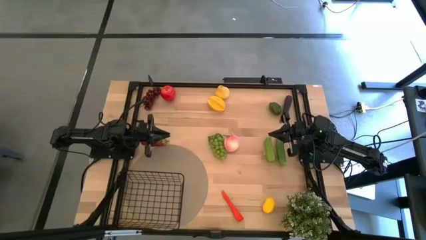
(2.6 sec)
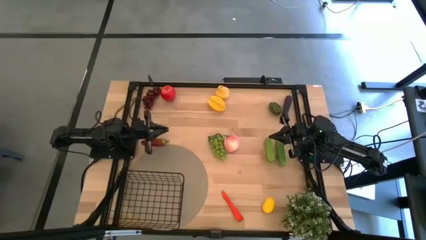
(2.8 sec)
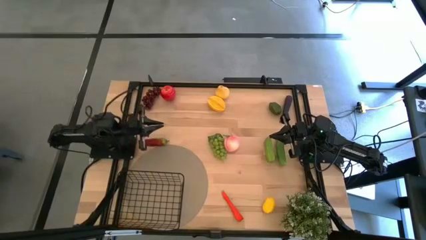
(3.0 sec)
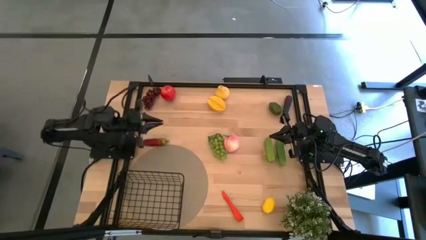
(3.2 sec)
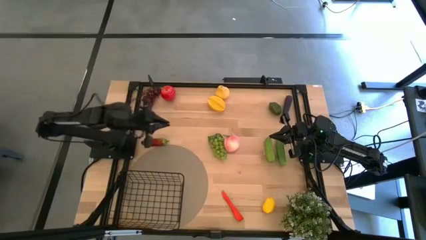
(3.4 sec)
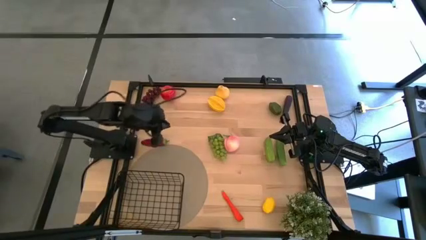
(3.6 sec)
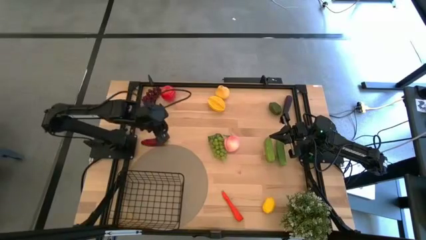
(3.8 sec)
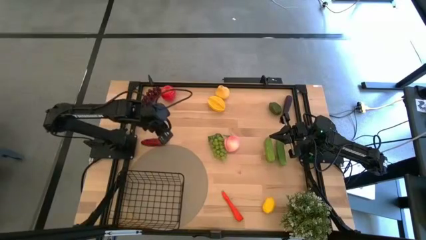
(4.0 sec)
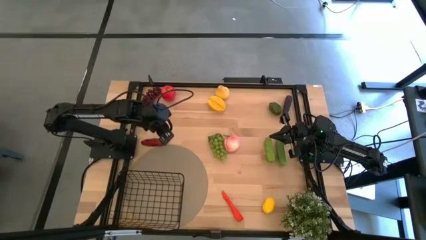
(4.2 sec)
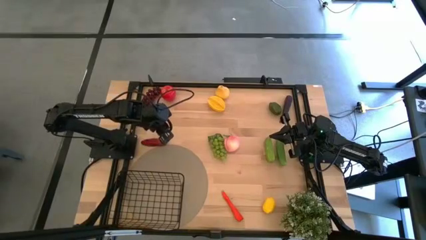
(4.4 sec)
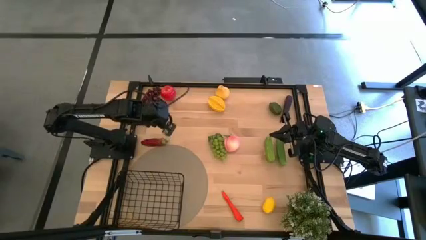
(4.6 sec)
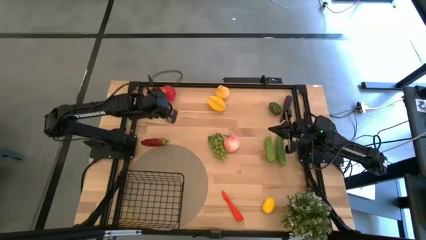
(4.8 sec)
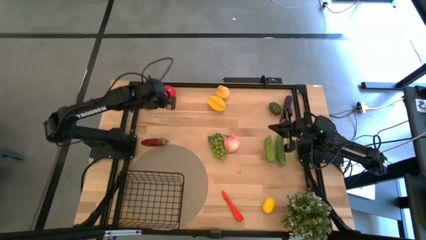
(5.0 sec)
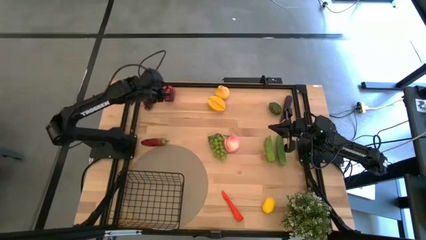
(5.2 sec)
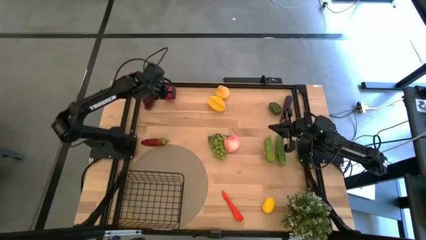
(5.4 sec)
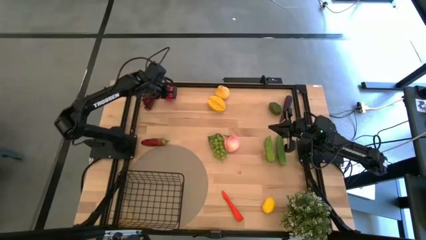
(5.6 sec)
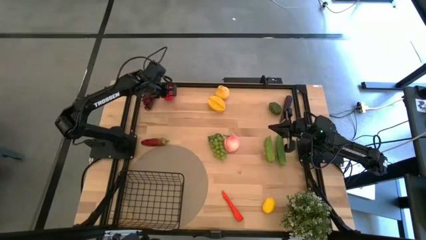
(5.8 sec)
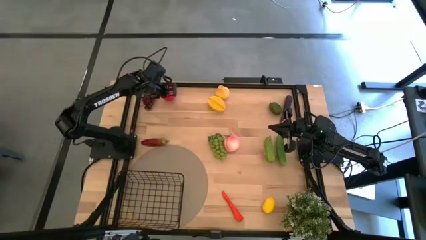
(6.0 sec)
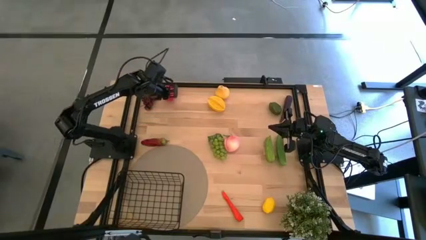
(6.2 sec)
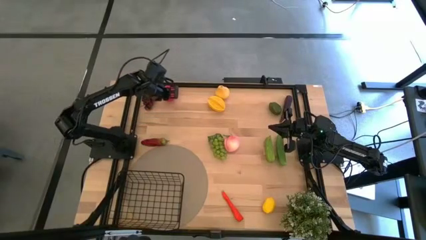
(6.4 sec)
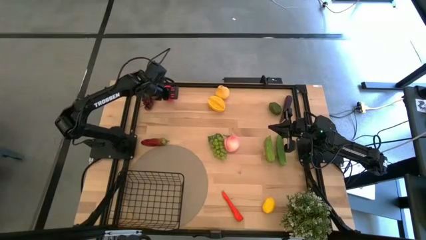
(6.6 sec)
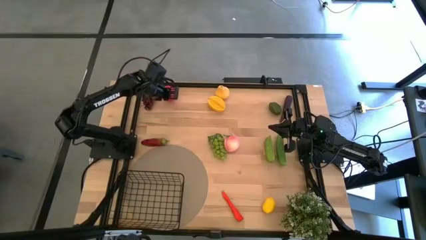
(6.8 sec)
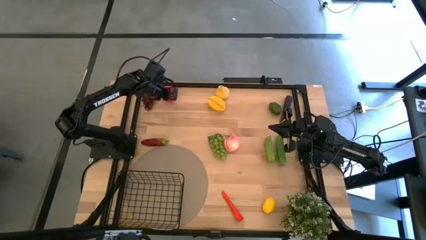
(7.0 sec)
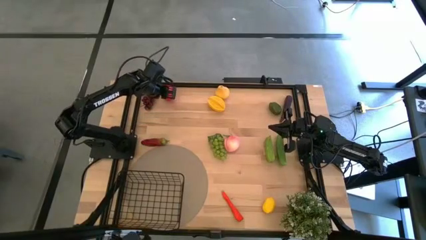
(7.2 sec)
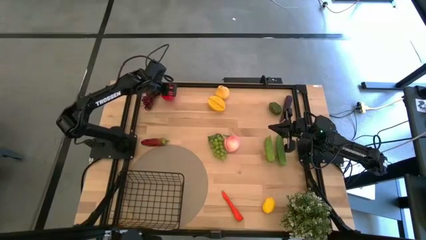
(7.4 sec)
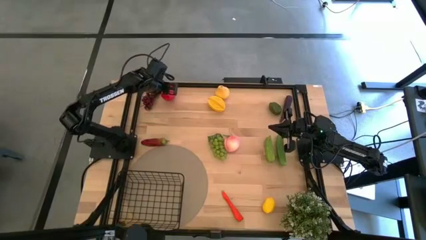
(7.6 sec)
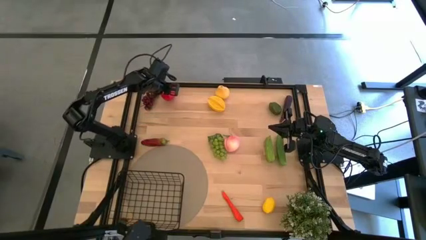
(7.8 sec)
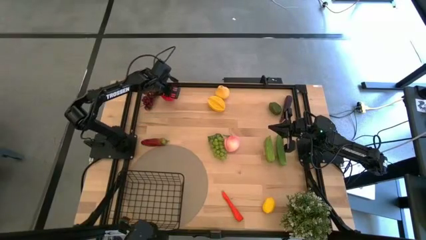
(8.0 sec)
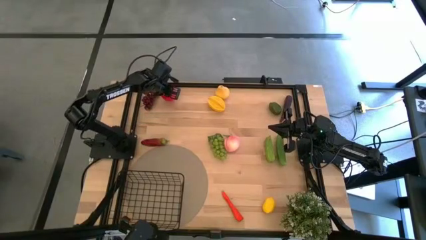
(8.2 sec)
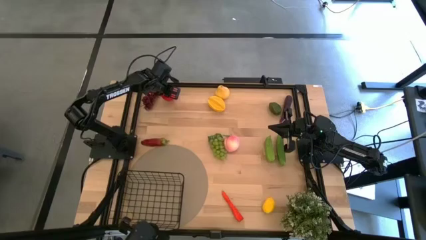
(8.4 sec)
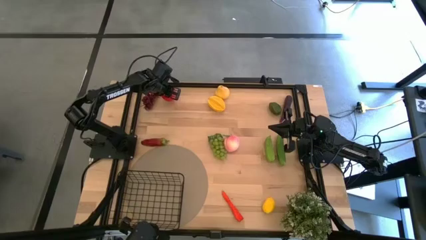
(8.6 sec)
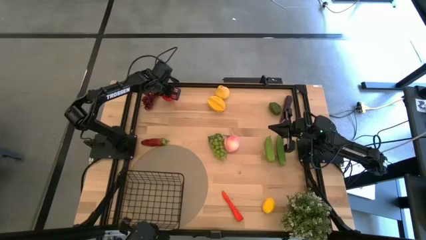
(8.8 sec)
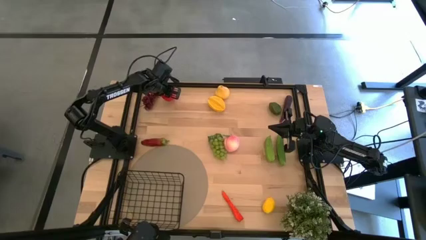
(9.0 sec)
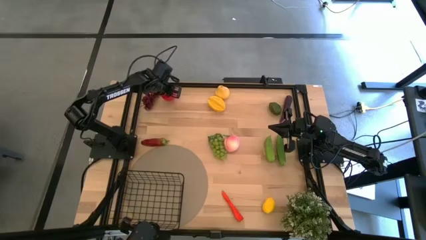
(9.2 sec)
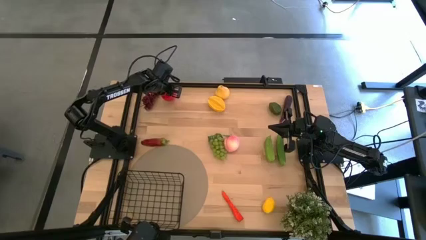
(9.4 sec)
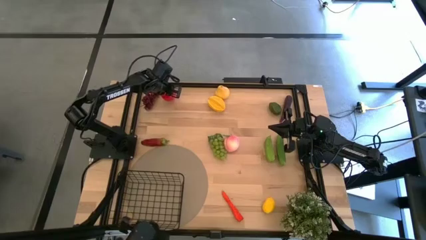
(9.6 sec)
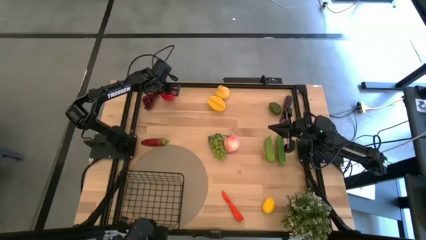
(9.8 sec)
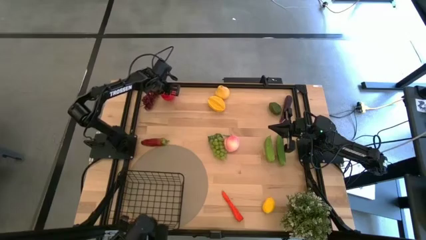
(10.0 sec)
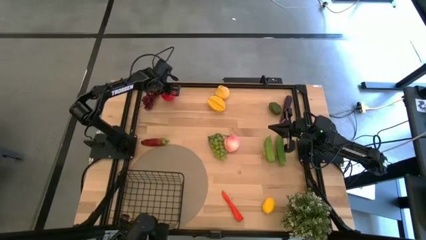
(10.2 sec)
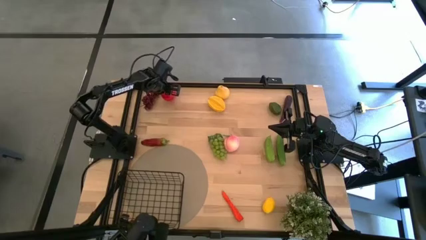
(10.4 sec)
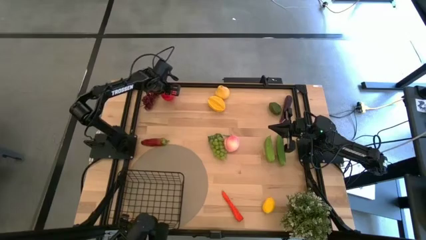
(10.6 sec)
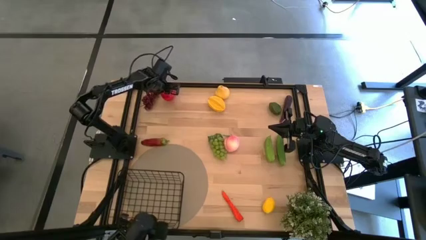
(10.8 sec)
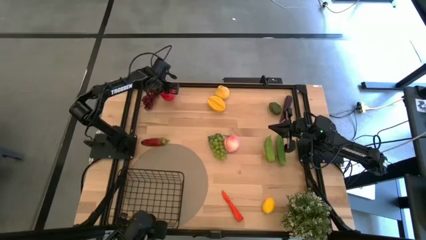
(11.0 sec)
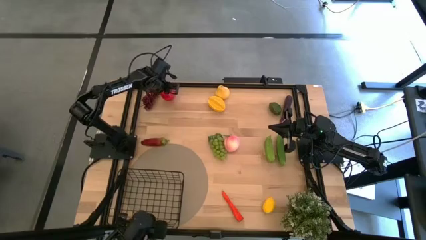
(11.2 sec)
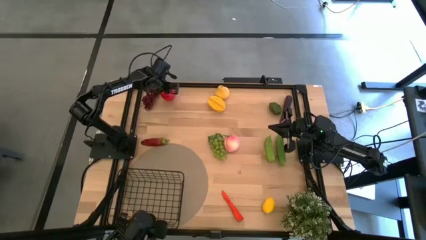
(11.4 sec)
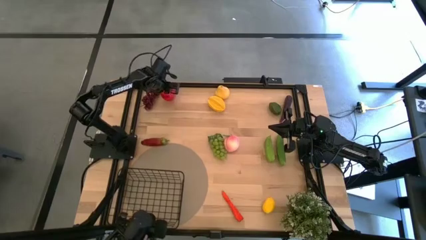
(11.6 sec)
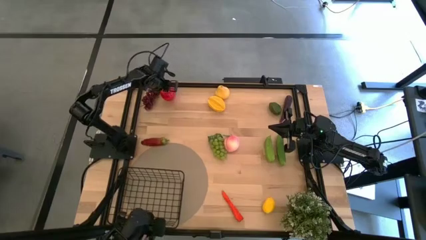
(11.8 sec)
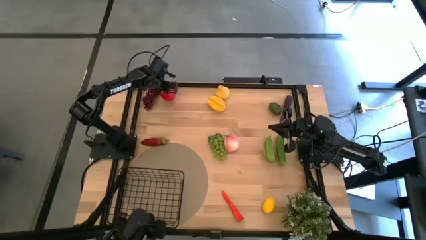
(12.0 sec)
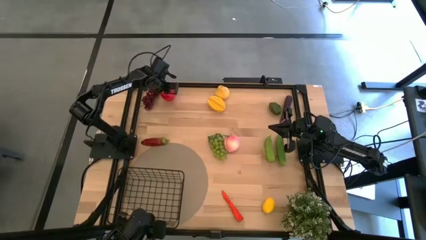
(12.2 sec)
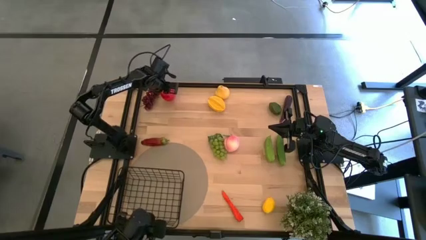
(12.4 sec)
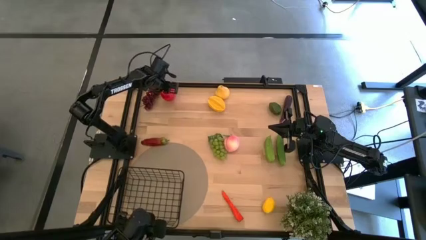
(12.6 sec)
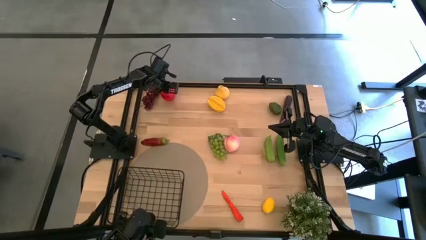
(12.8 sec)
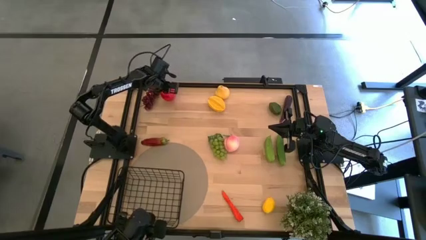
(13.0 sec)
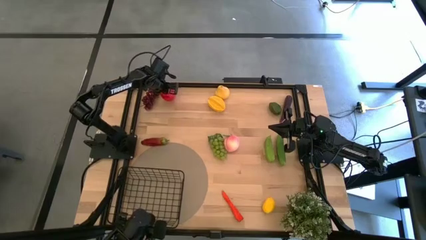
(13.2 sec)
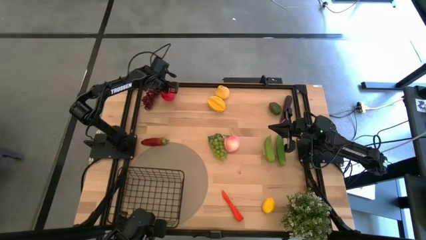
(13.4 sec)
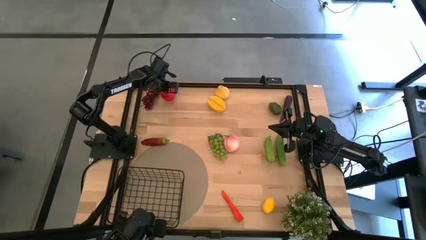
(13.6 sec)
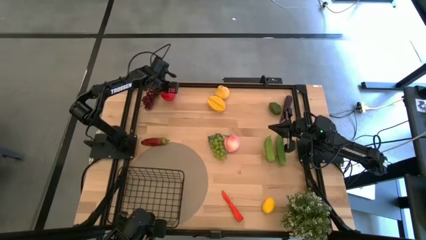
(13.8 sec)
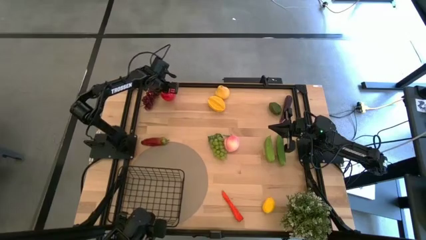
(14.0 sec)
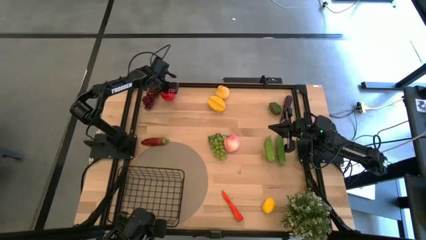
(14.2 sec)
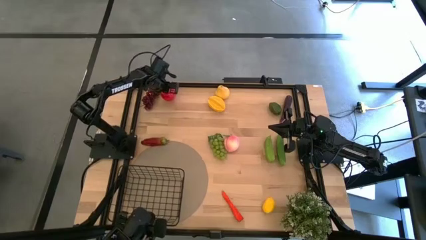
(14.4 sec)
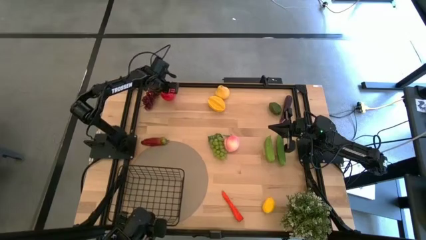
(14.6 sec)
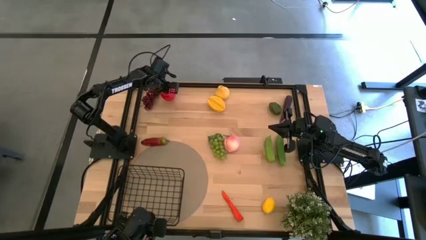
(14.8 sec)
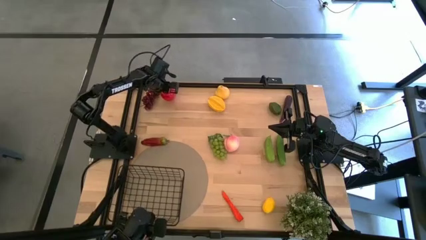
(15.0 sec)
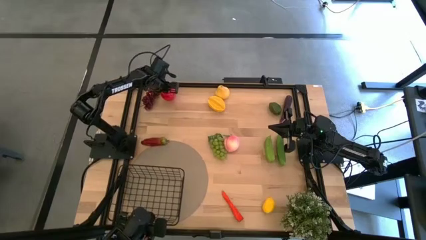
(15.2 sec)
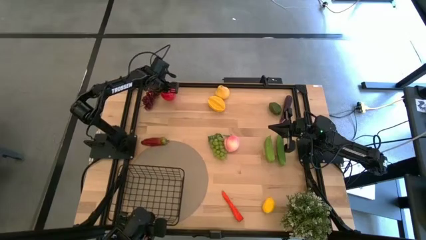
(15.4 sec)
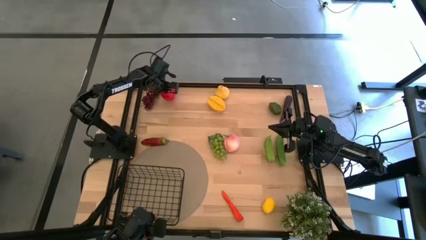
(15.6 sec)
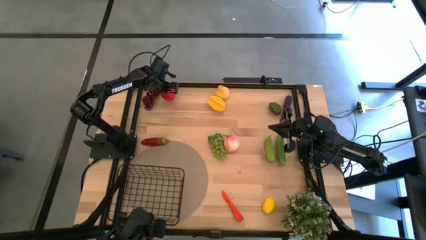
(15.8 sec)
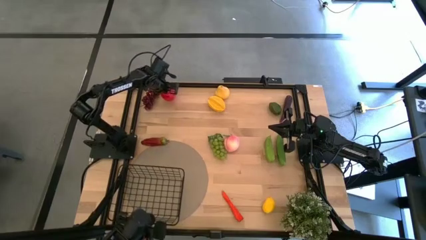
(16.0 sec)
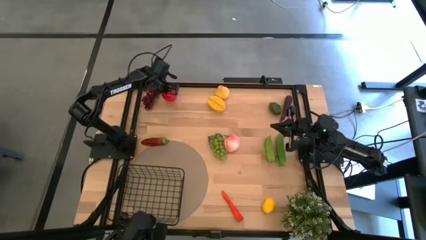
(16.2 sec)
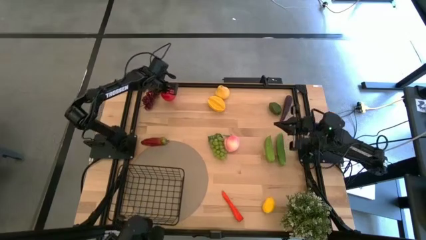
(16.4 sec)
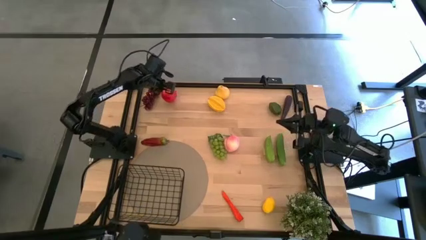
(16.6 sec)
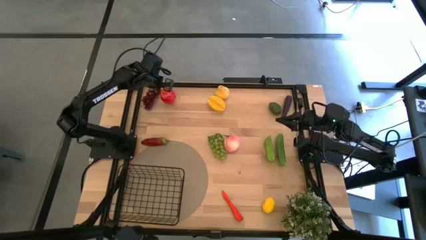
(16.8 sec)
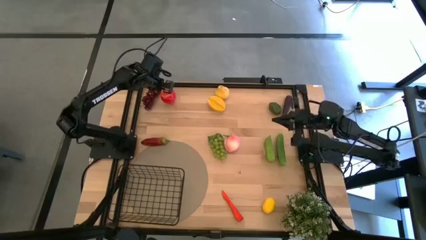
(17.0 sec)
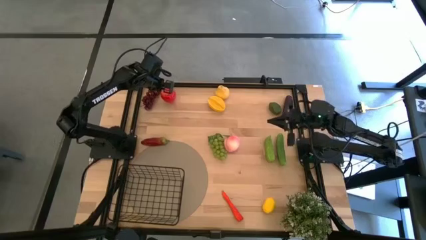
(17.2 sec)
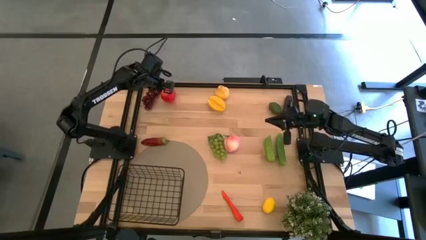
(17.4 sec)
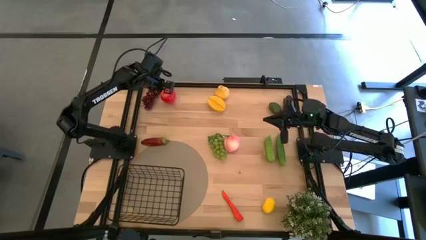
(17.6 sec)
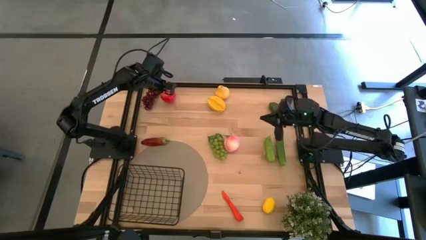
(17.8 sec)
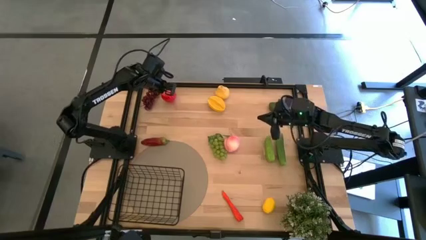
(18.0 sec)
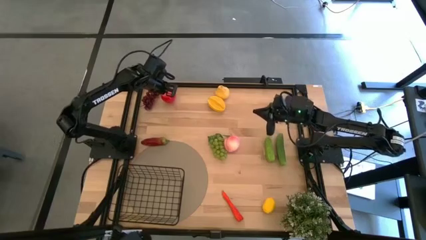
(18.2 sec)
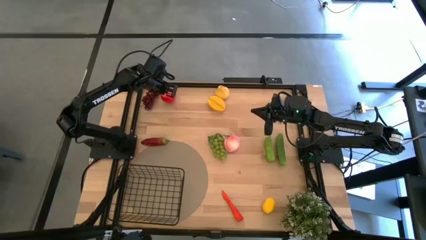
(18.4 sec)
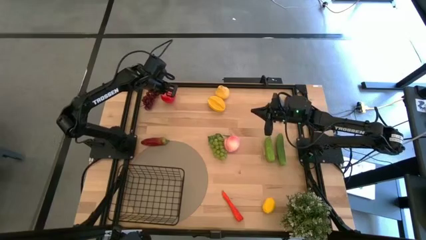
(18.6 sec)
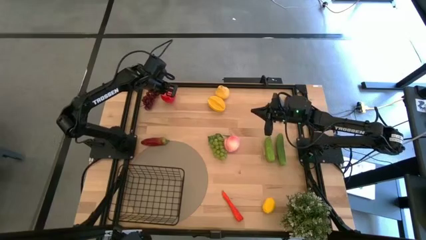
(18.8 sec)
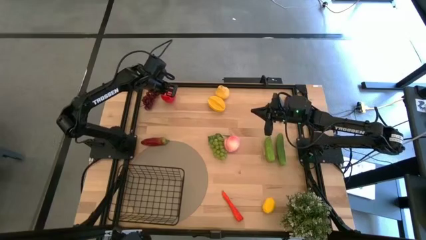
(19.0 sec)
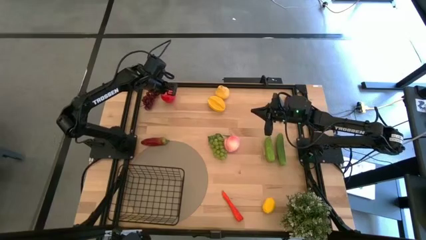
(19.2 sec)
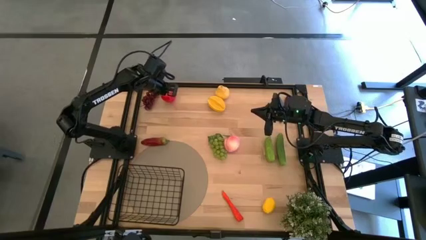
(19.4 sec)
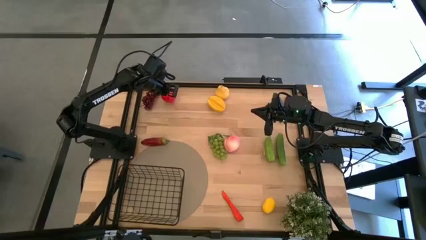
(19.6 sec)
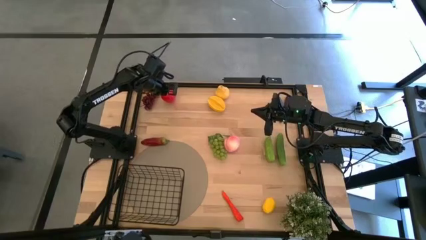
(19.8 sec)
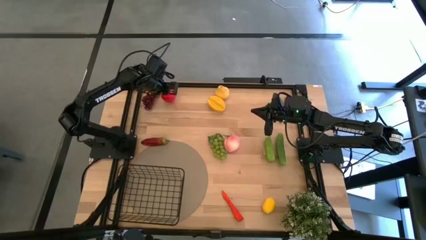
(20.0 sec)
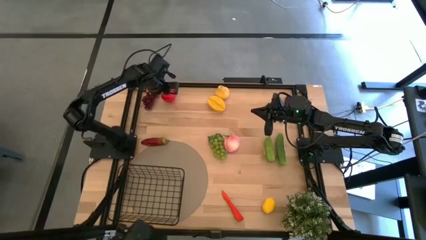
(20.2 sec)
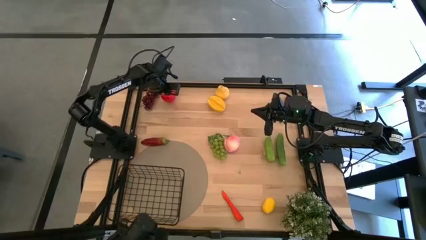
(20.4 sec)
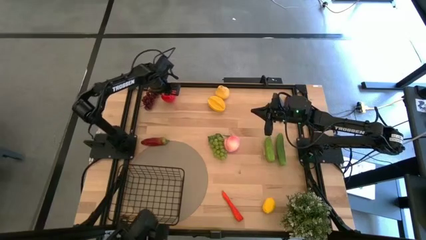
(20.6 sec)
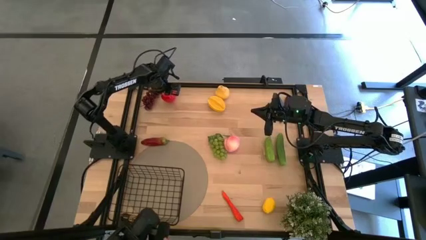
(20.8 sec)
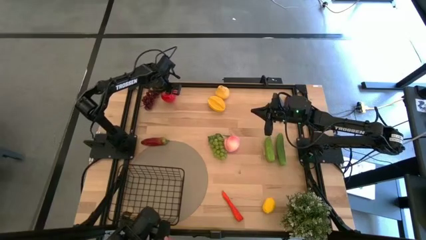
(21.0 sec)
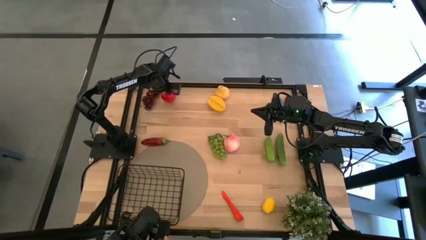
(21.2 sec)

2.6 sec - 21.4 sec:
Task: Build produce basket
Put the red apple into the wire basket
